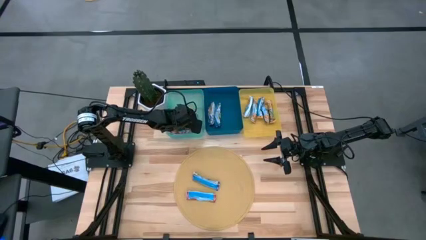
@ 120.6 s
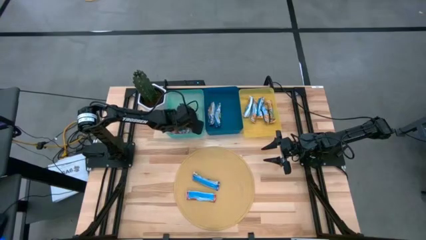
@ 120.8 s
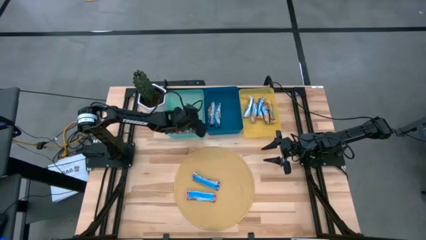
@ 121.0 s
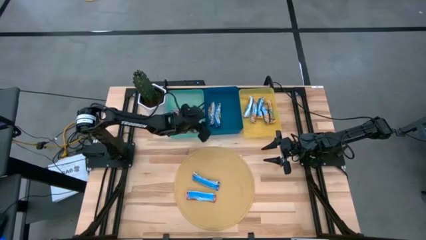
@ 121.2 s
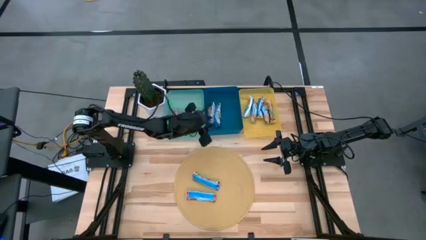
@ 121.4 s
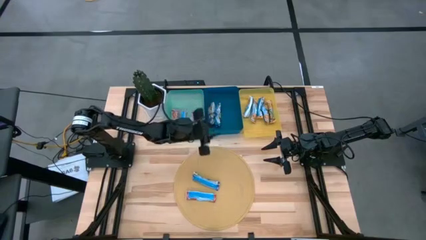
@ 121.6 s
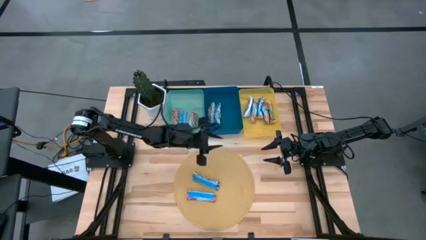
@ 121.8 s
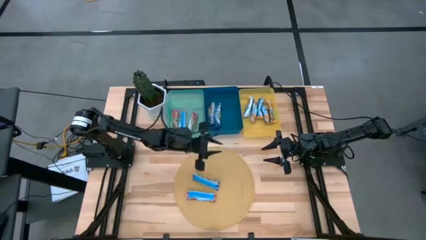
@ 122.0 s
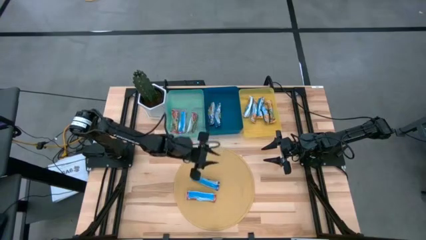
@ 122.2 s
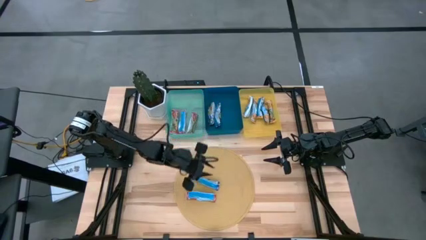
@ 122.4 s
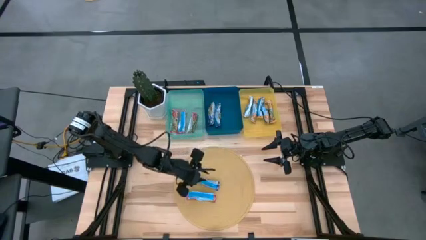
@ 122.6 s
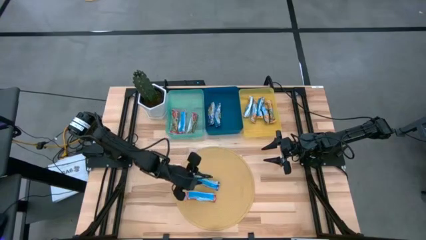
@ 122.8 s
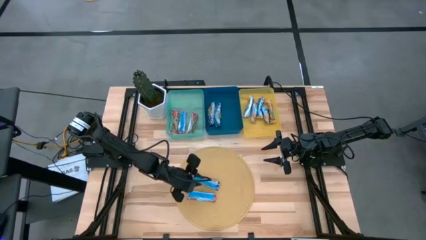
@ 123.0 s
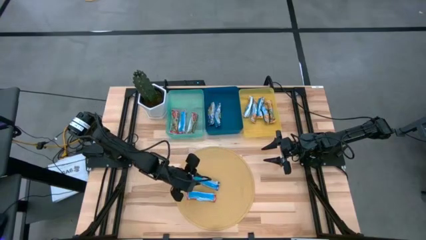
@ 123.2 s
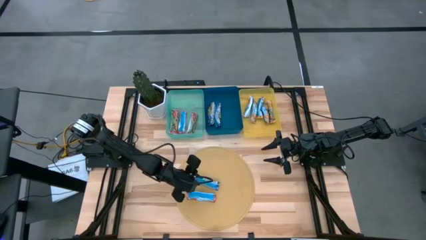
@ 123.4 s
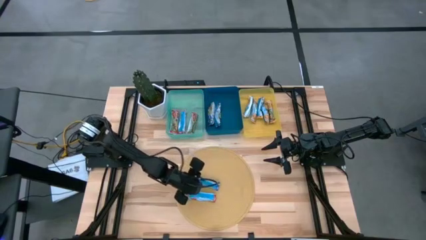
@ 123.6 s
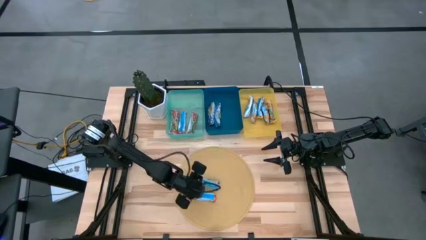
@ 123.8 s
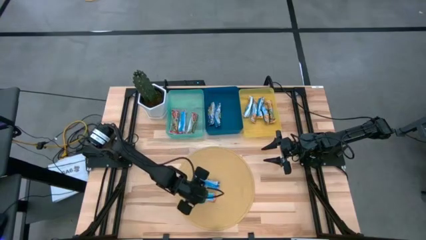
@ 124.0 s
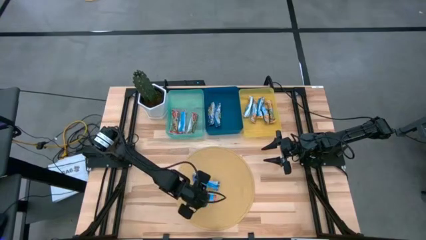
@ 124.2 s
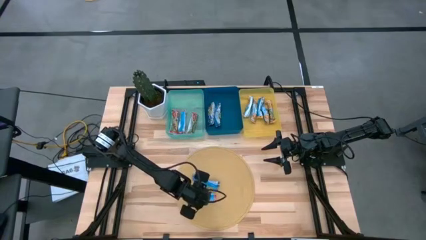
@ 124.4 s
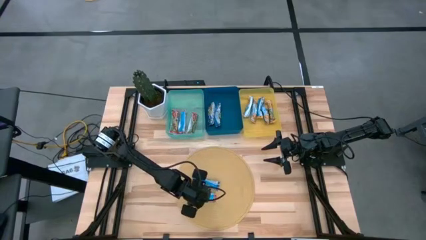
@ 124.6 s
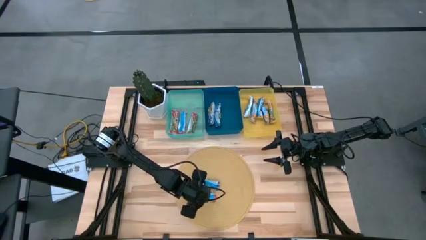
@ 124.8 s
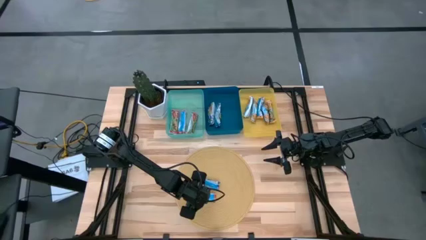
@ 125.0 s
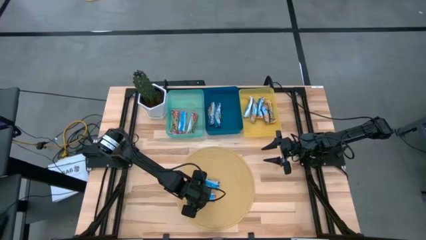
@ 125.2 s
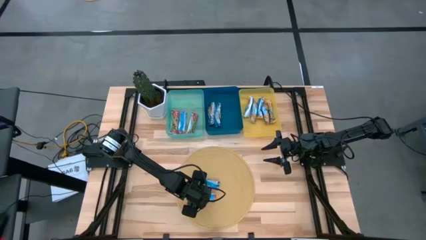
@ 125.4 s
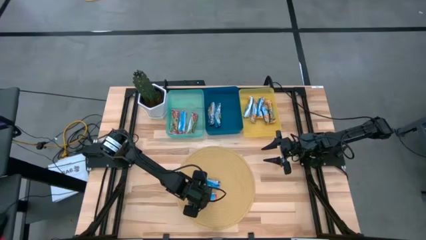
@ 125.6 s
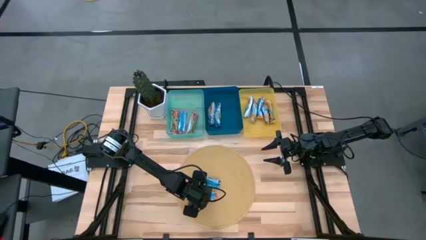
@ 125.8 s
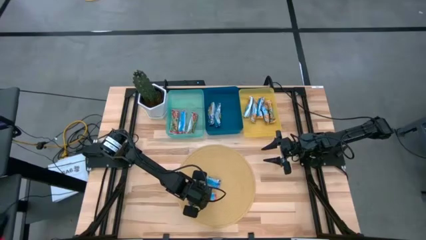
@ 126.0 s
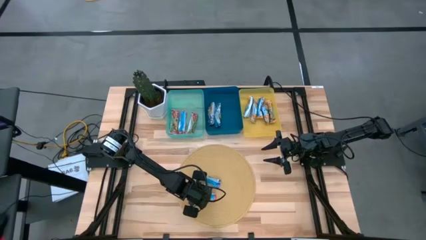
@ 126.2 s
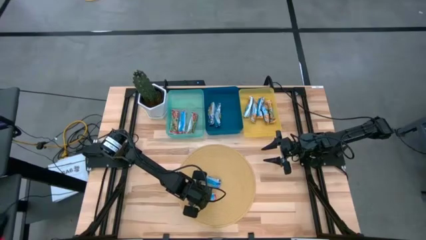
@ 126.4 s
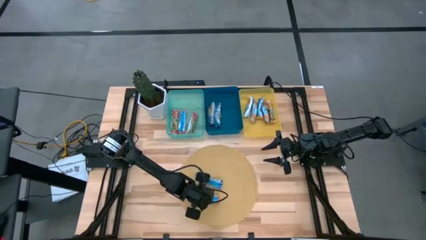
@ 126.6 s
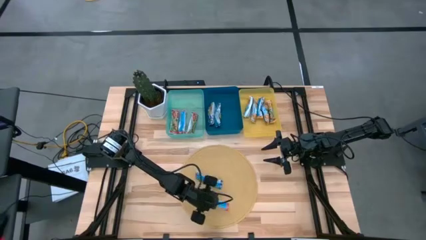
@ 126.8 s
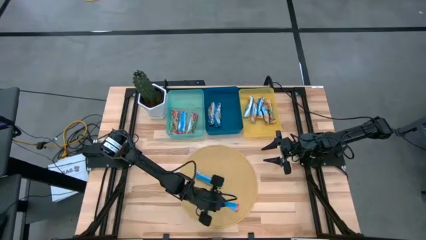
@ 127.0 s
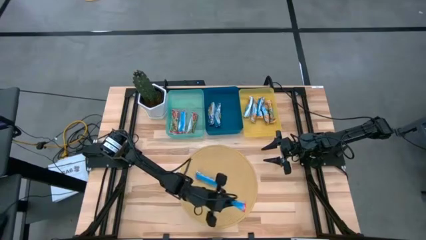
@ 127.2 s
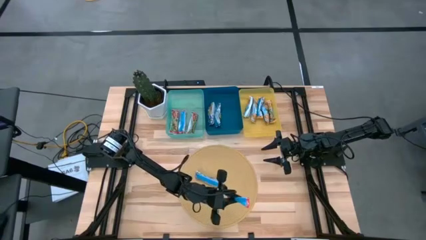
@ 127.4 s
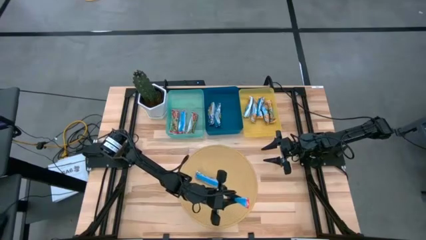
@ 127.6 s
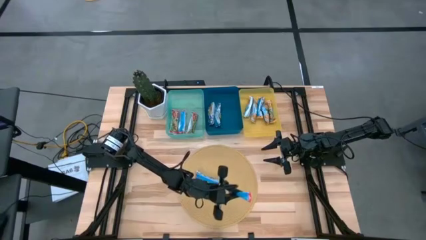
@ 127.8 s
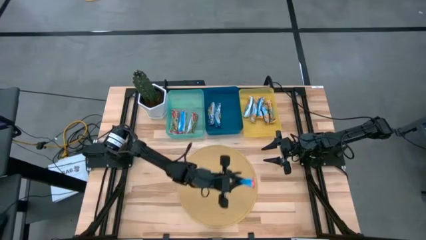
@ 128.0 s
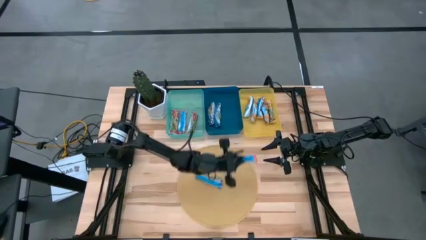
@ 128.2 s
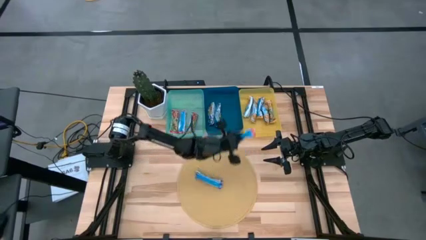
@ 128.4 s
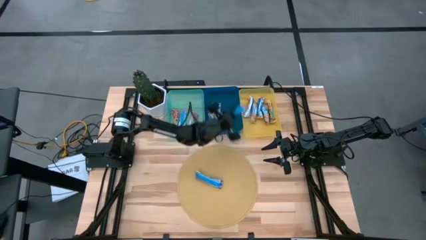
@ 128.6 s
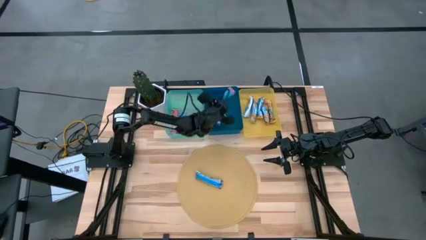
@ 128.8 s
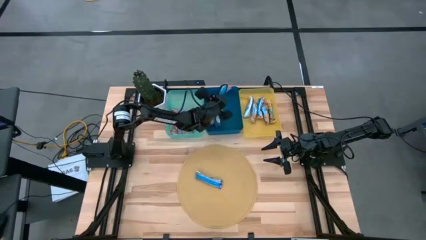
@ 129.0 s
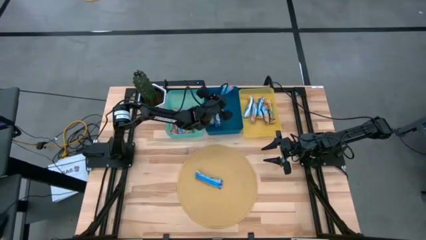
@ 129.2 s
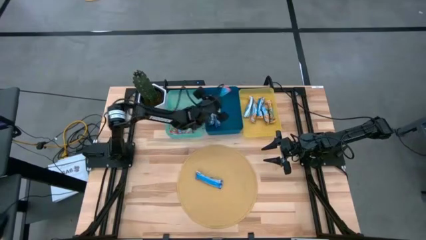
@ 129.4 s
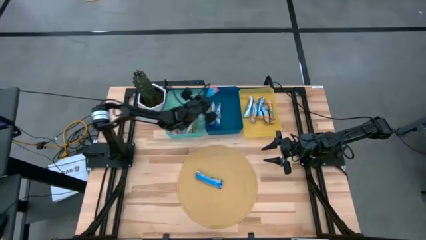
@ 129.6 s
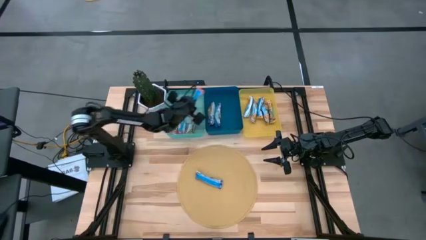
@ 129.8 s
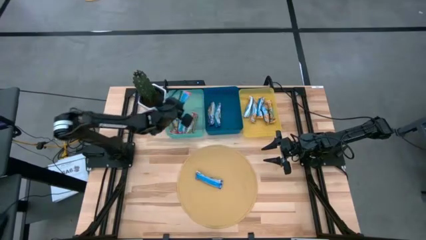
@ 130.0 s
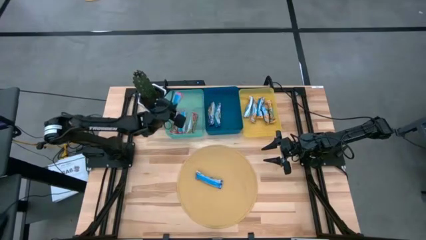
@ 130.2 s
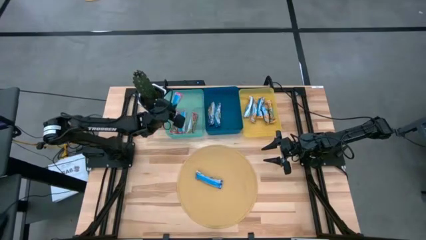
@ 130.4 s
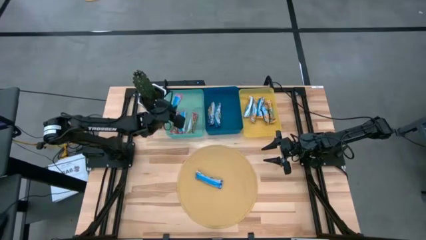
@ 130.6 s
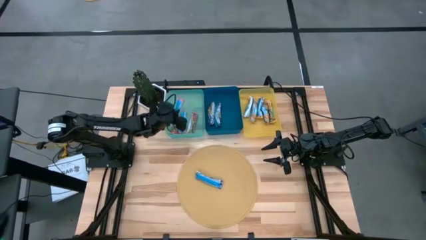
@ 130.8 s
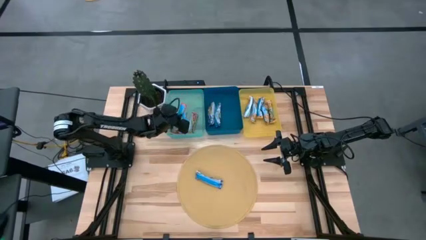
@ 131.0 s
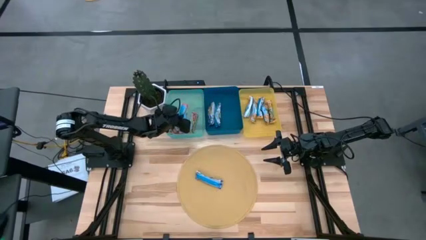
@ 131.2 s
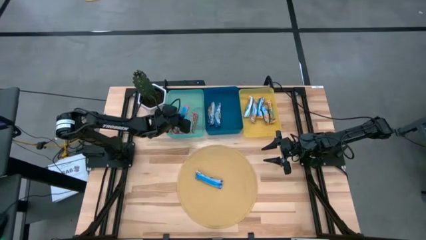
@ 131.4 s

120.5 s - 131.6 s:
Task: Pick and place Granola Bars by type
Put the red granola bar into the green bin

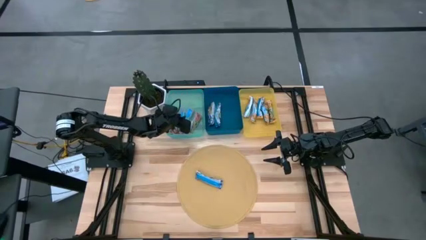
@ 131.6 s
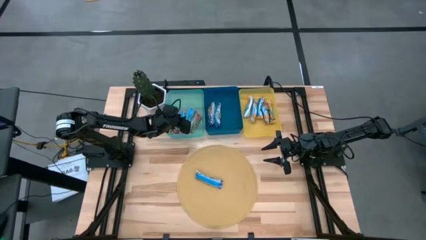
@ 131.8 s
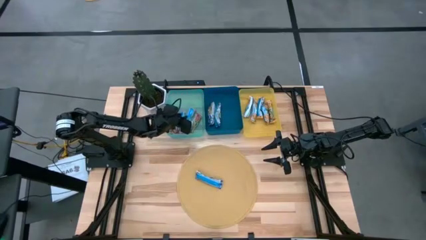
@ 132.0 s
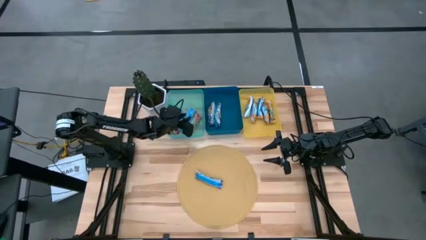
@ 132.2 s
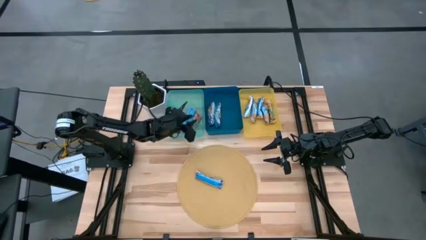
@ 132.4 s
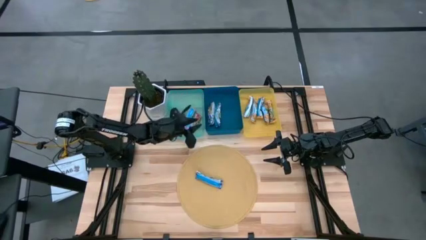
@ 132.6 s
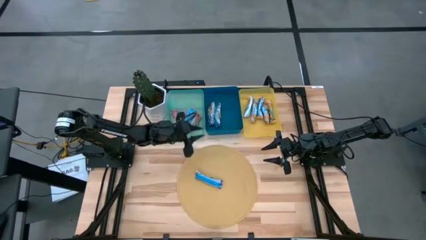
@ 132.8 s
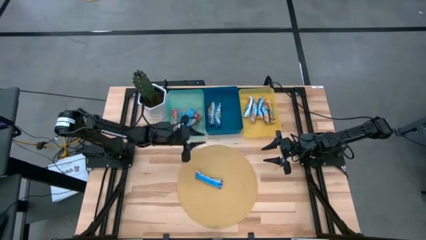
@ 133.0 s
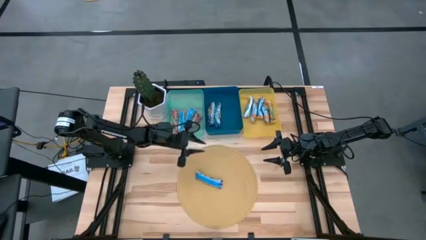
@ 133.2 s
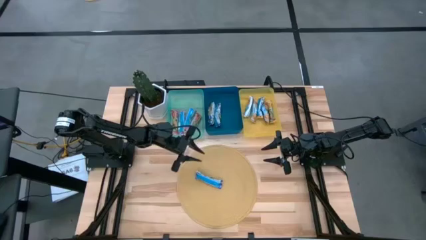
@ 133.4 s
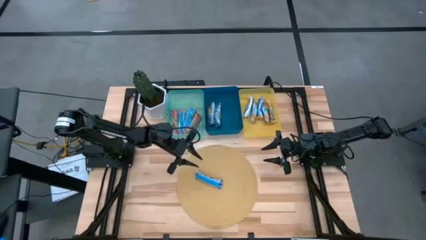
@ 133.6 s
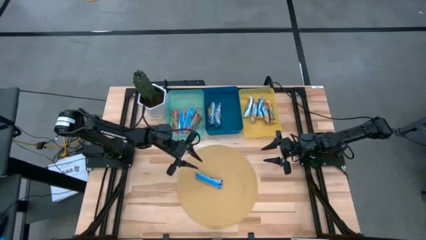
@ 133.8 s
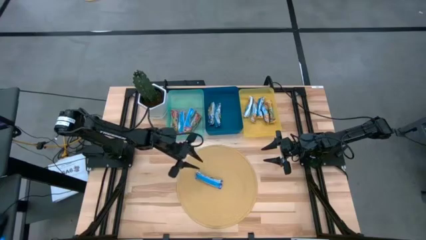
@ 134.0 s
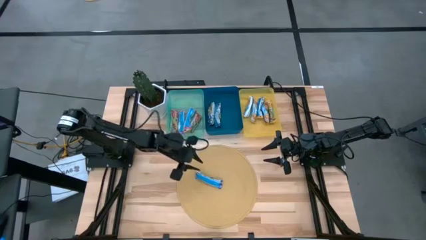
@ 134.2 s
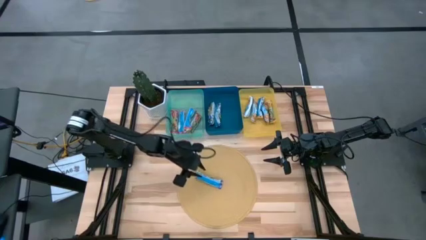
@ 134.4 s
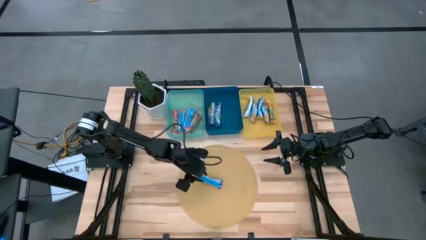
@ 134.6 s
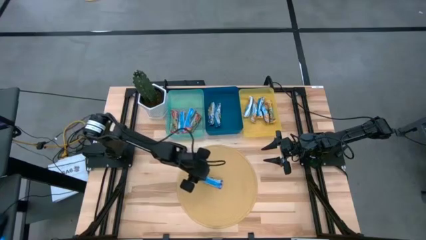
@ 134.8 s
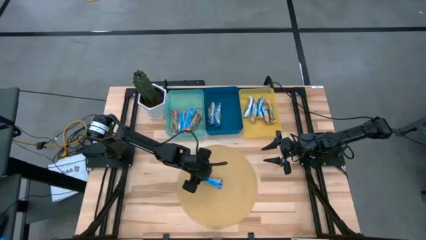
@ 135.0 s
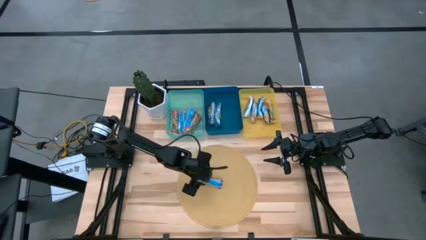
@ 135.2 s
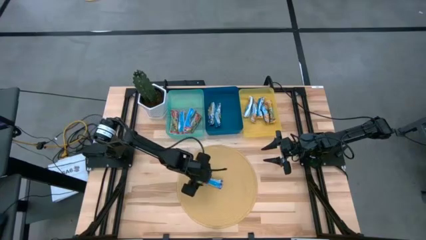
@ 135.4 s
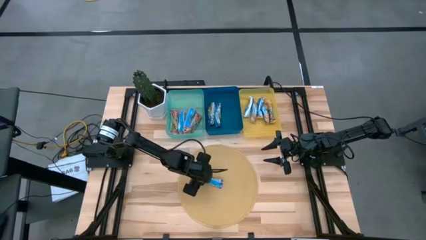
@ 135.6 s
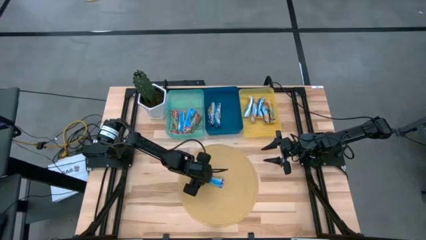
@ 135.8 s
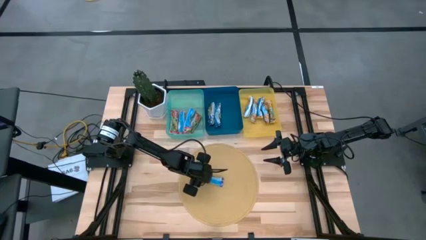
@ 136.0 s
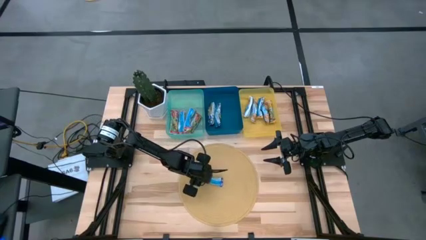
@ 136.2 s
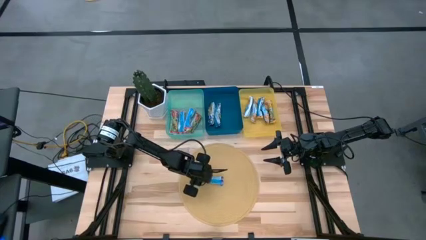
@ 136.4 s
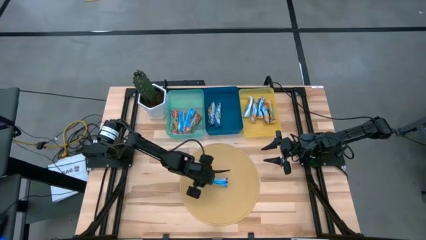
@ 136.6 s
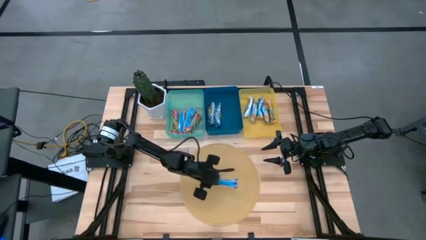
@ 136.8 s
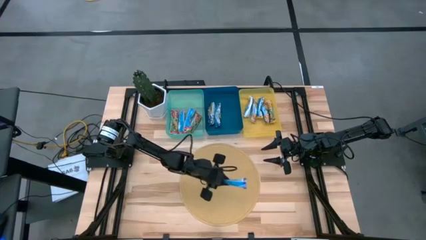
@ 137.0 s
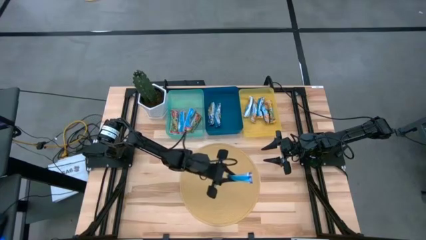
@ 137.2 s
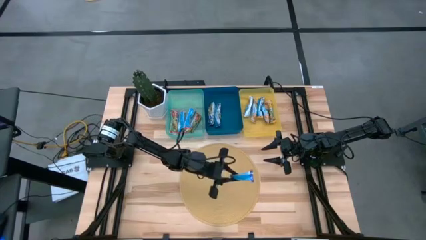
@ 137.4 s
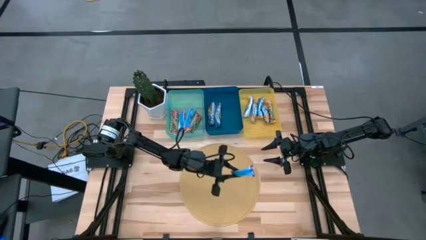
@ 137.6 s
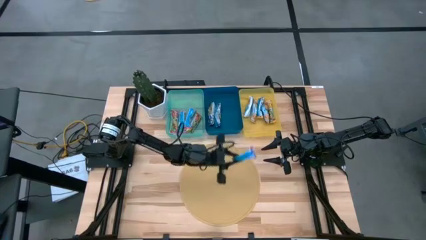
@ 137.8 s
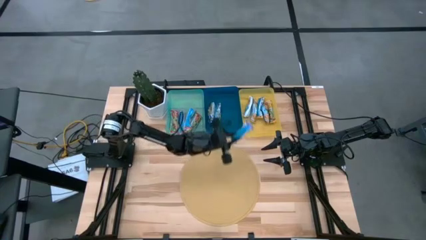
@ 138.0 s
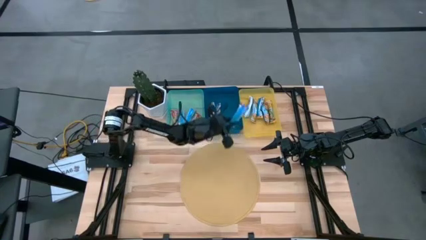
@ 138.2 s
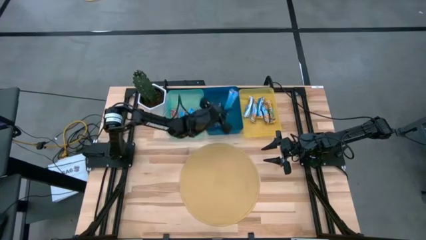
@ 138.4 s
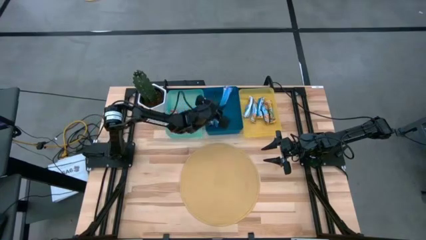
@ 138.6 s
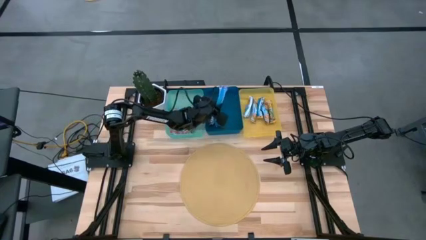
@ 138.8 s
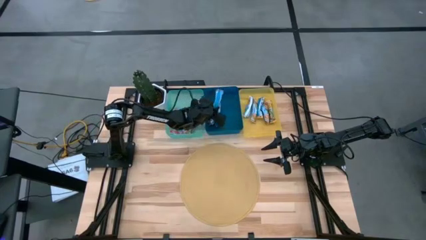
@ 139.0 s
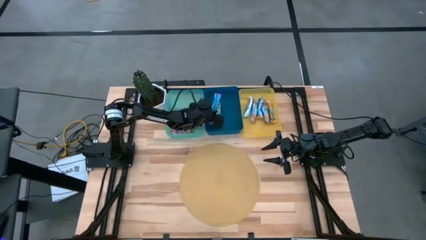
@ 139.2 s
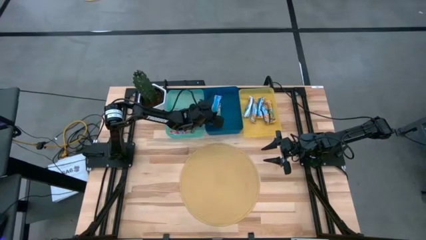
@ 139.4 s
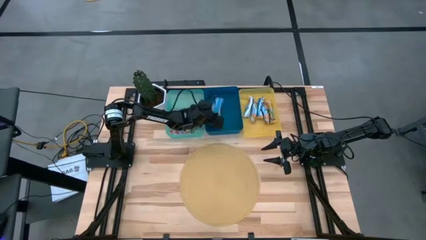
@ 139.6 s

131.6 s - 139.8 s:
Put the blue granola bar into the blue bin
